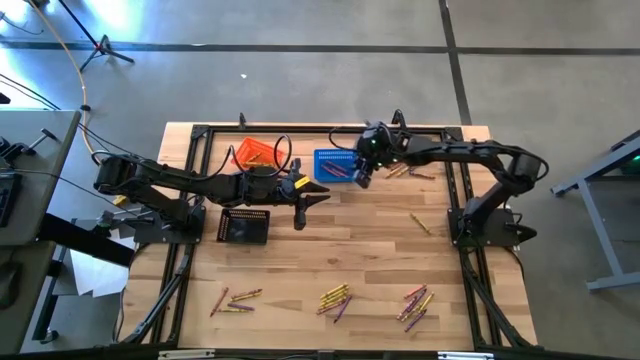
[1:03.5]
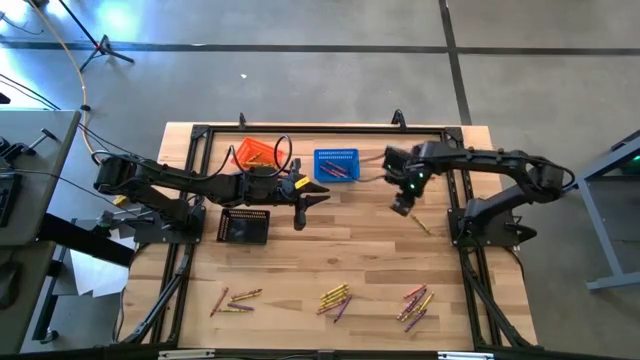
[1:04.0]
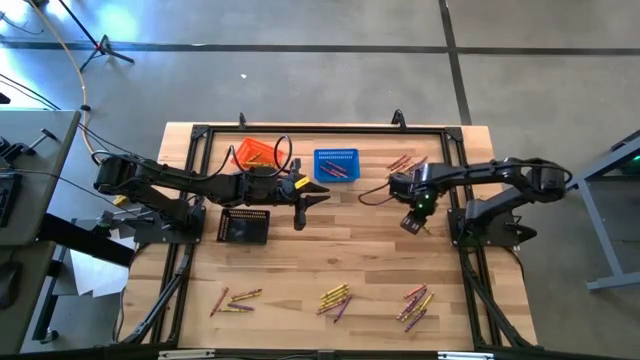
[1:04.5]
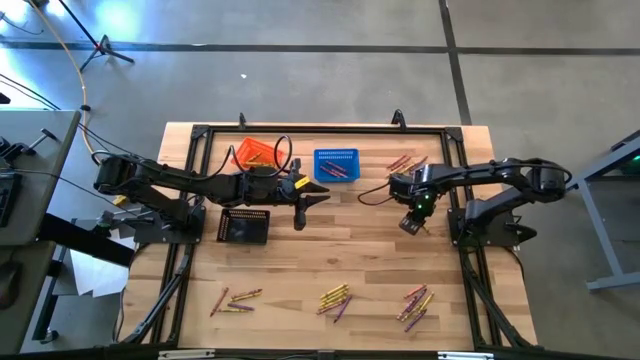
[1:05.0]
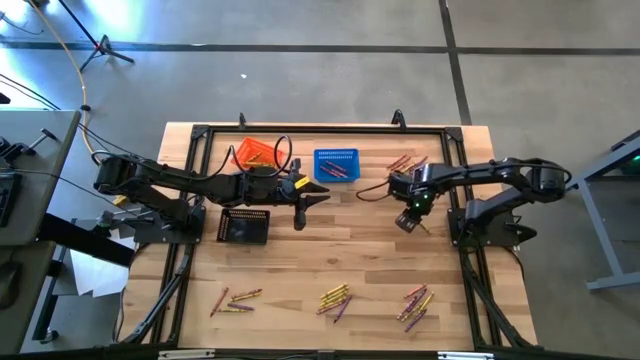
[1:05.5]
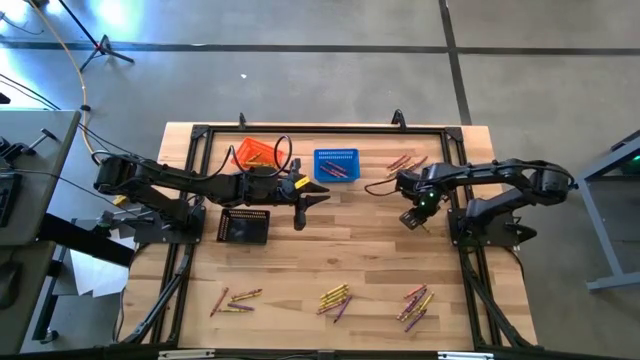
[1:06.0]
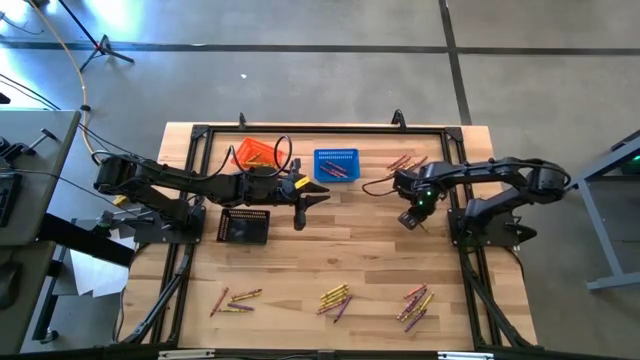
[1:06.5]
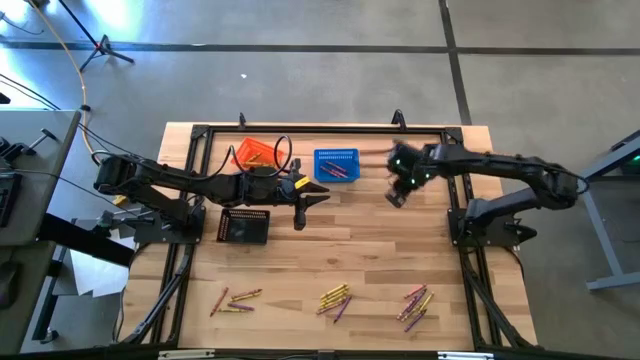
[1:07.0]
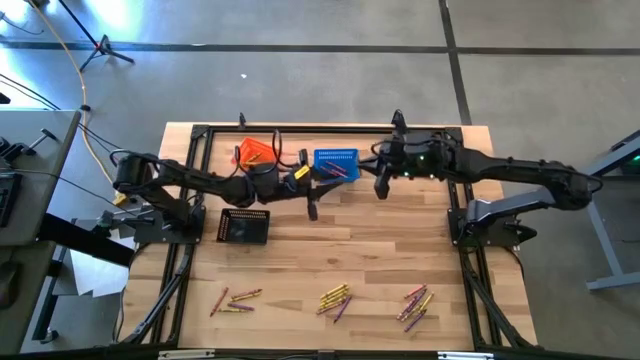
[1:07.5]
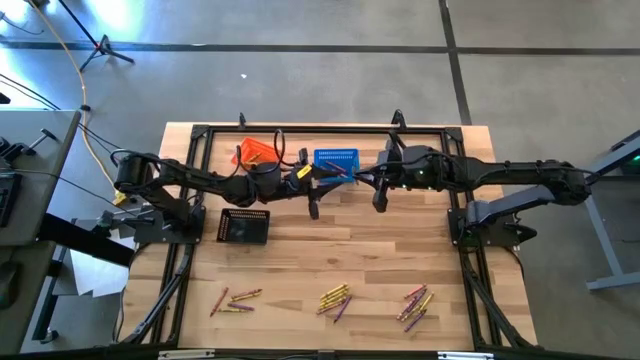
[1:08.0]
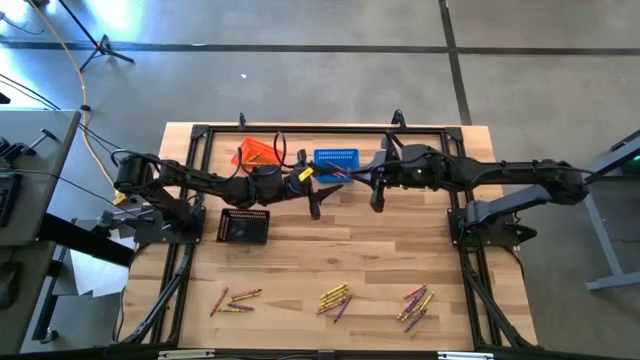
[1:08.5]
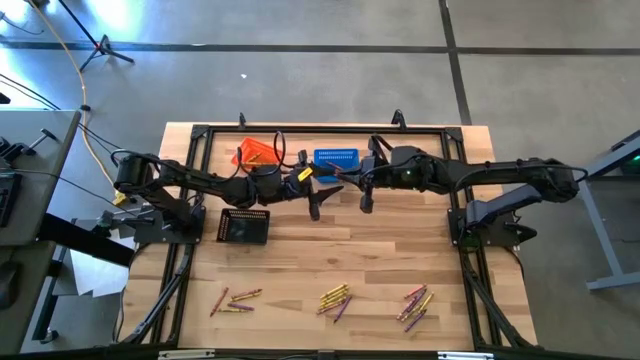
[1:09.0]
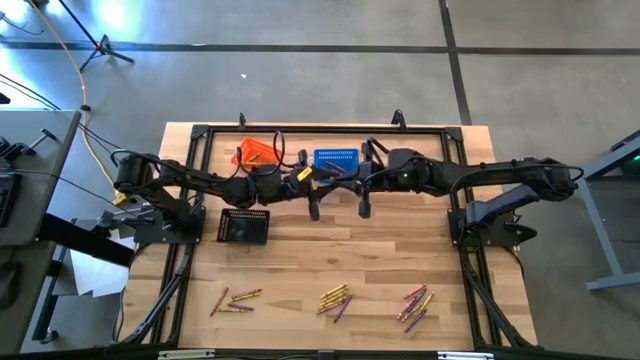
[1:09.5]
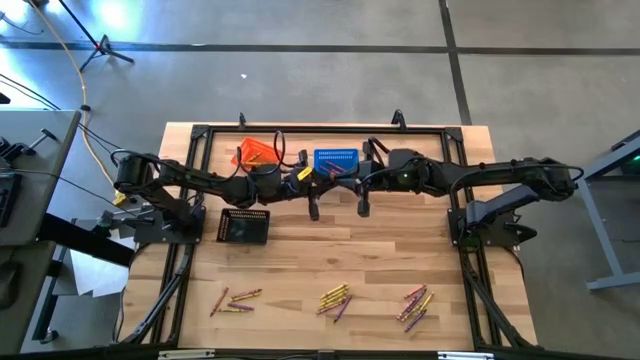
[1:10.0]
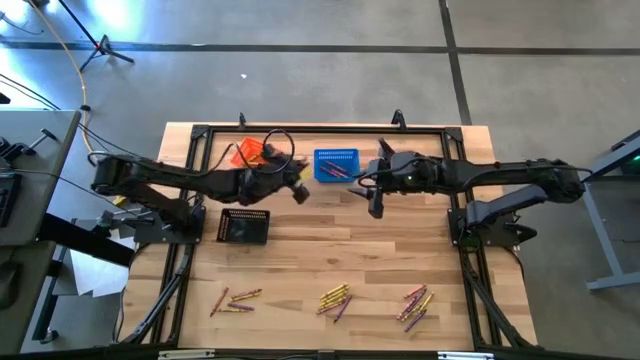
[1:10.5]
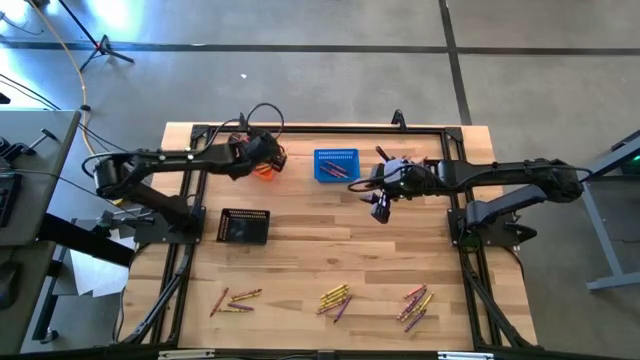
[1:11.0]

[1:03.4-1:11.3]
Task: Sort crayons
Put the yellow crayon into the orange bin

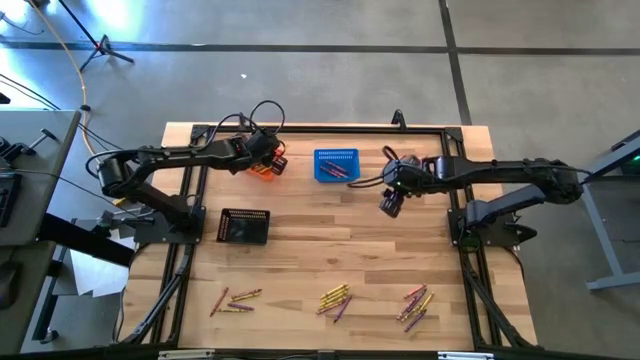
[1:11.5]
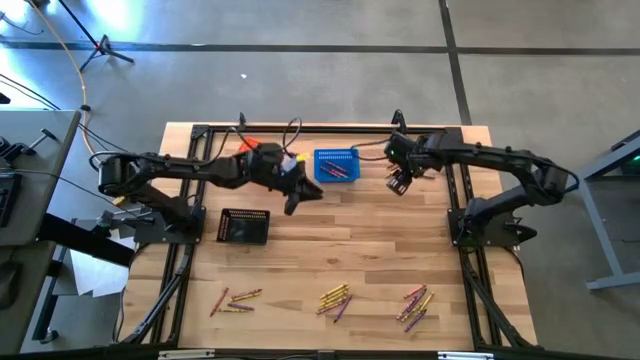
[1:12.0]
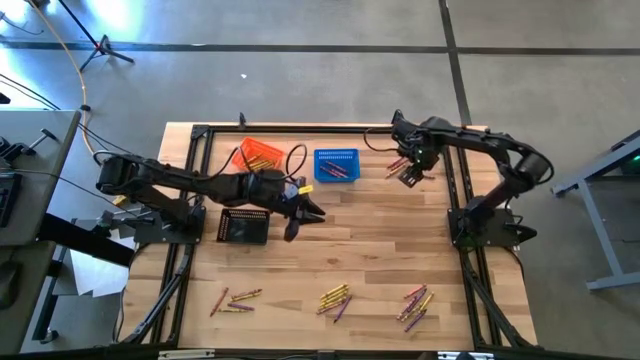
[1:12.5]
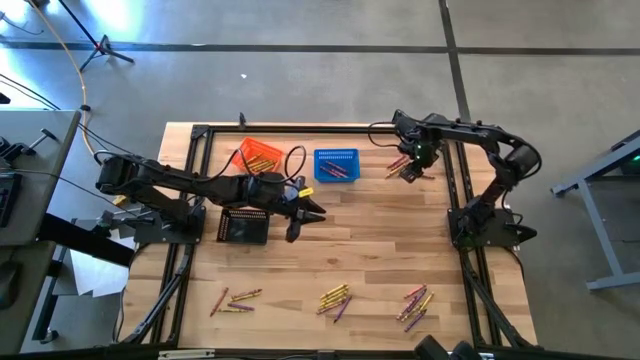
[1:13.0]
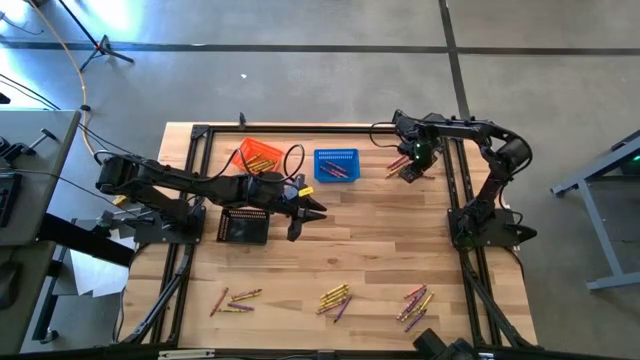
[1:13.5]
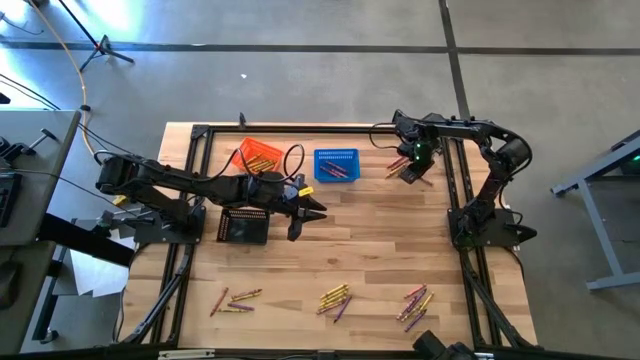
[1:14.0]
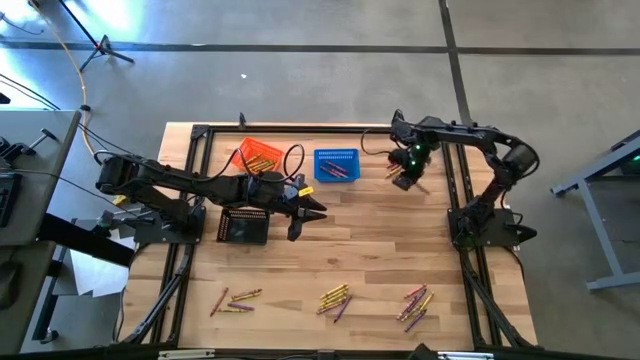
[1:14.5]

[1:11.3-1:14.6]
Put the red crayon into the blue bin

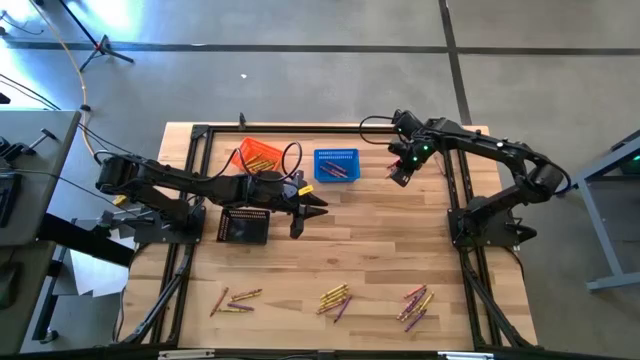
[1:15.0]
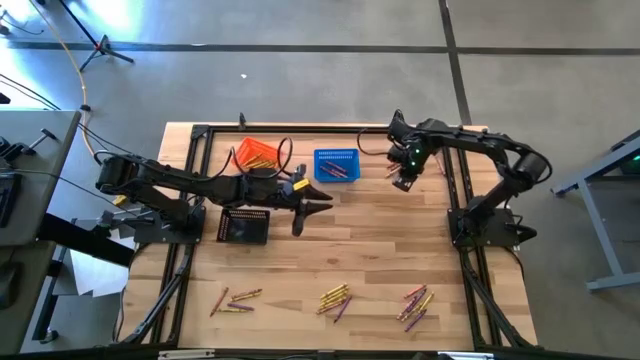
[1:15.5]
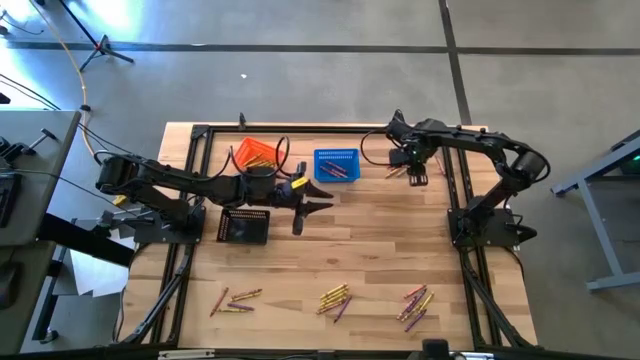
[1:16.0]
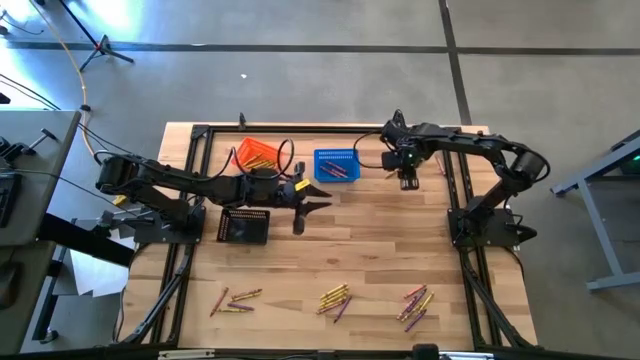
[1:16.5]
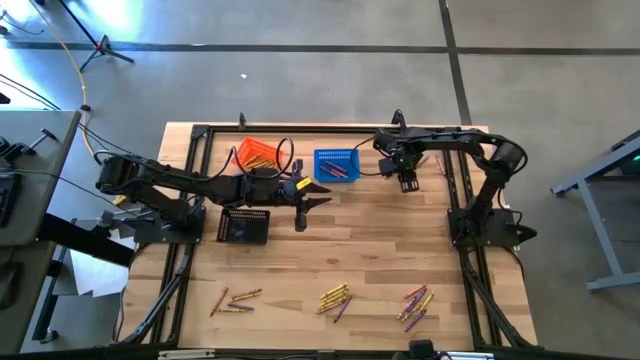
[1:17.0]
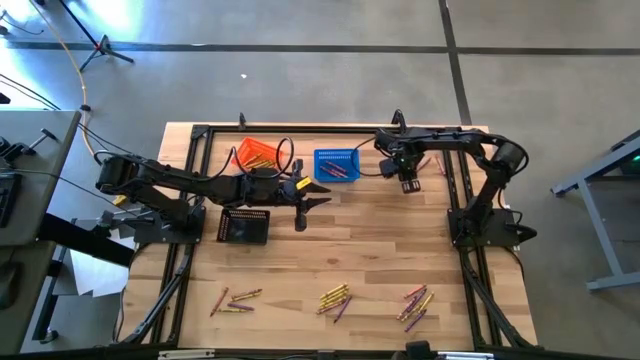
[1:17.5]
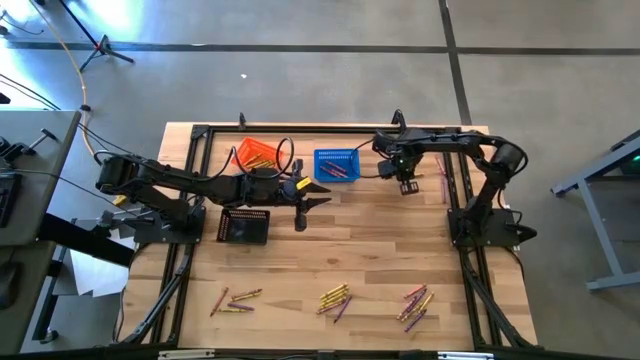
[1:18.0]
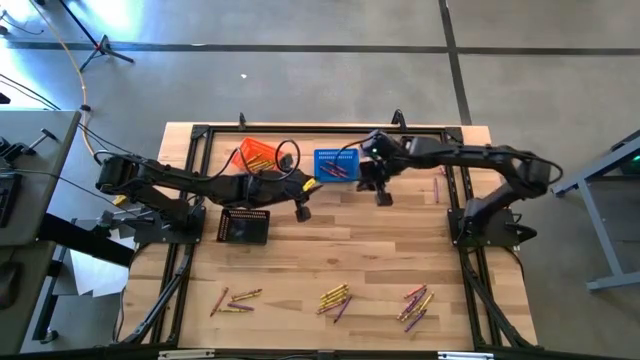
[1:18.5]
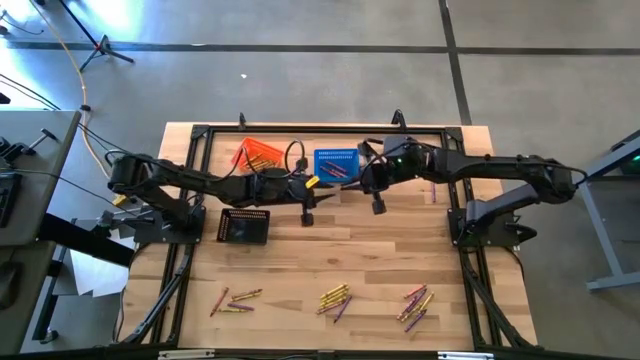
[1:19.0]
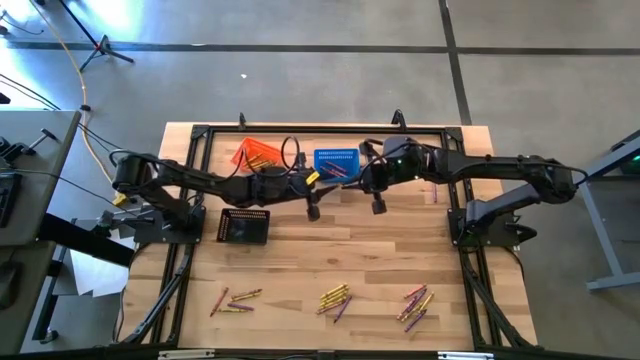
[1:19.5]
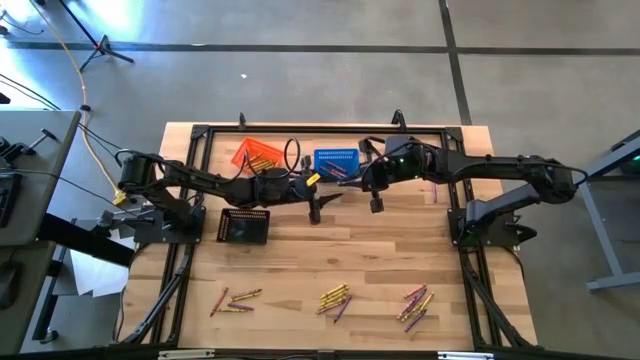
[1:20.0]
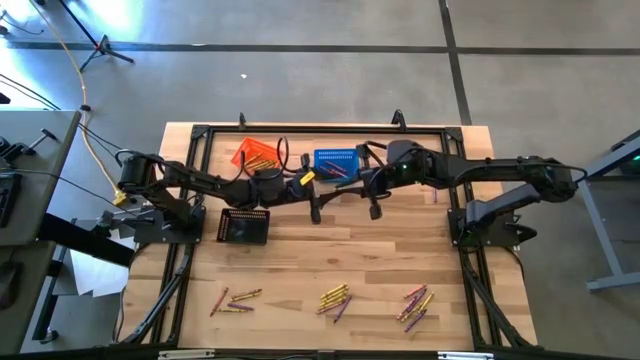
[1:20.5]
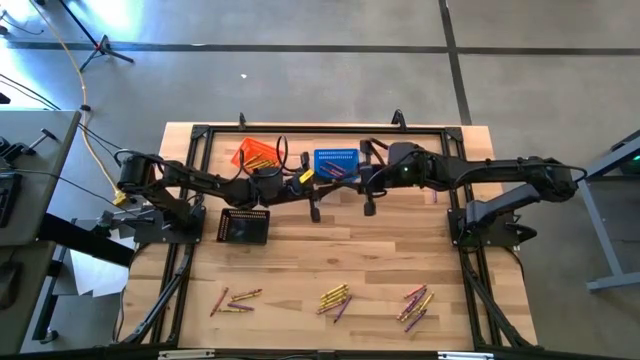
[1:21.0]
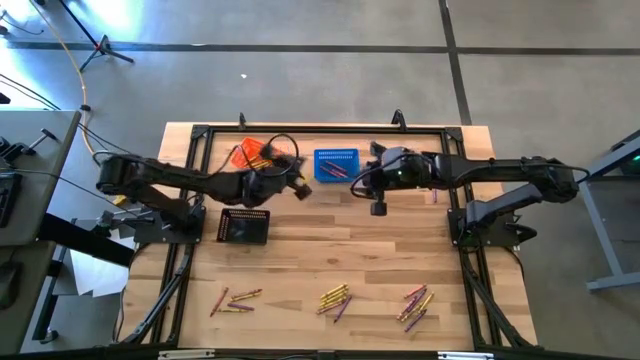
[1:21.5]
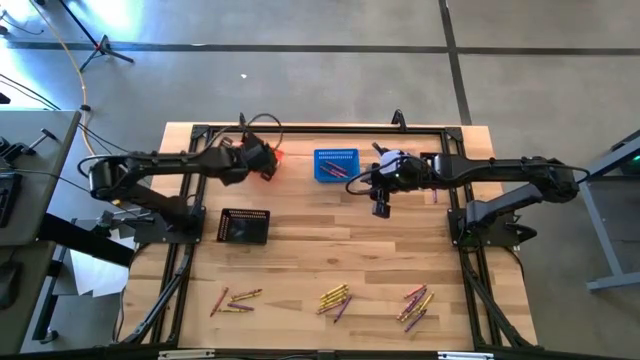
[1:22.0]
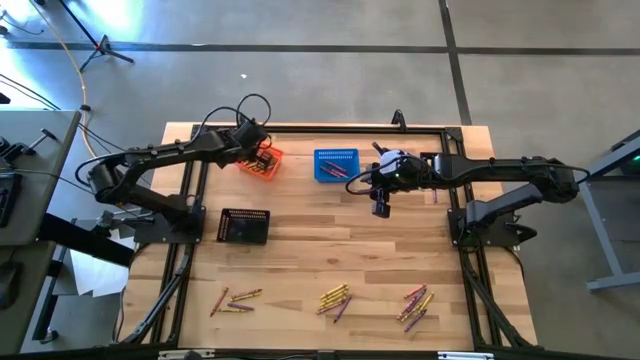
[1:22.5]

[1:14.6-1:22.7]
Put the yellow crayon into the orange bin

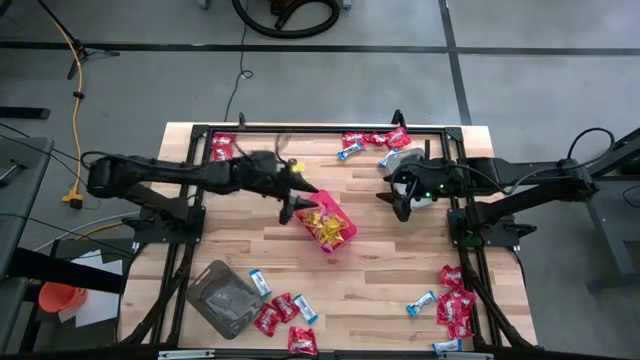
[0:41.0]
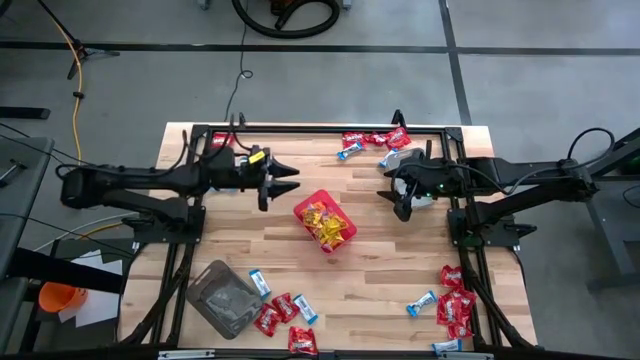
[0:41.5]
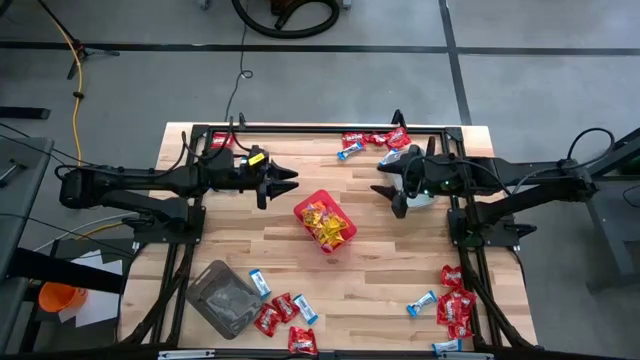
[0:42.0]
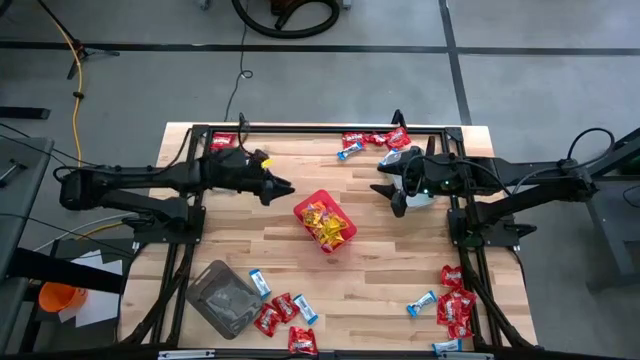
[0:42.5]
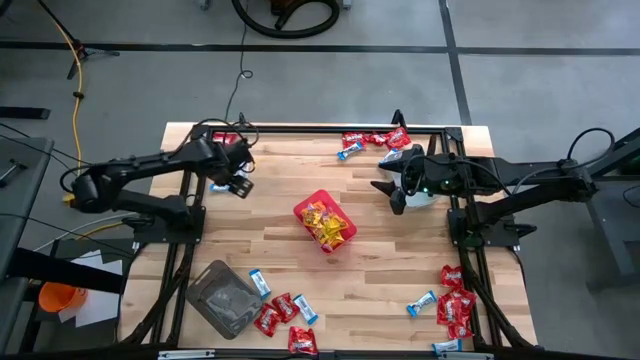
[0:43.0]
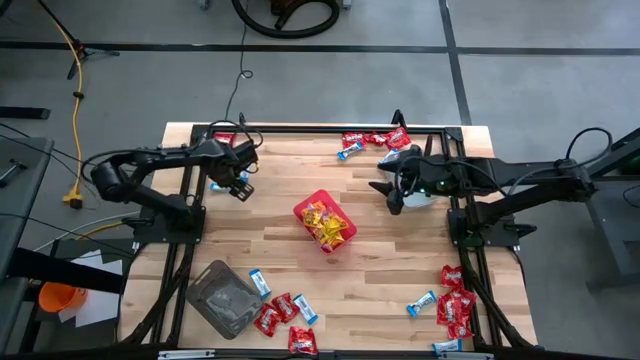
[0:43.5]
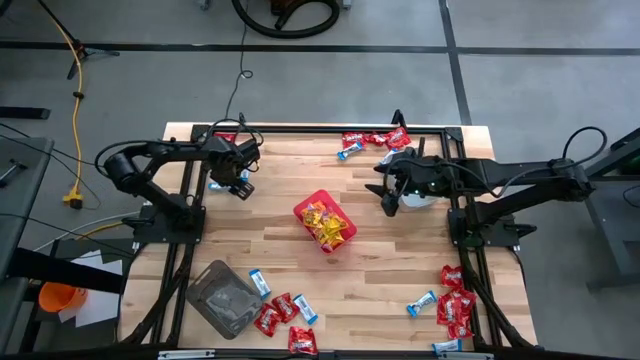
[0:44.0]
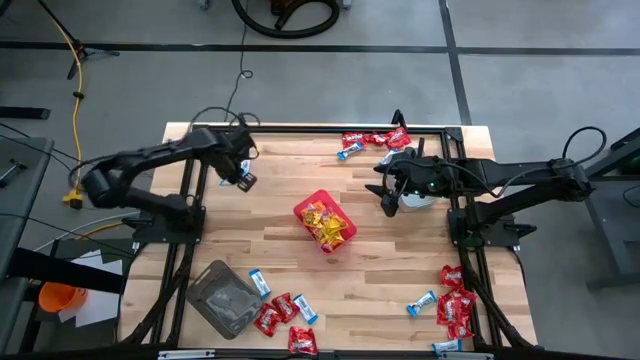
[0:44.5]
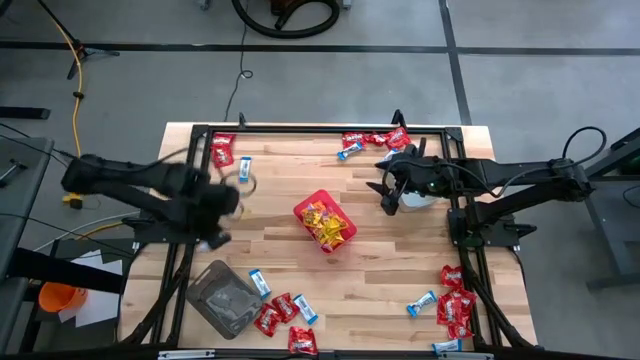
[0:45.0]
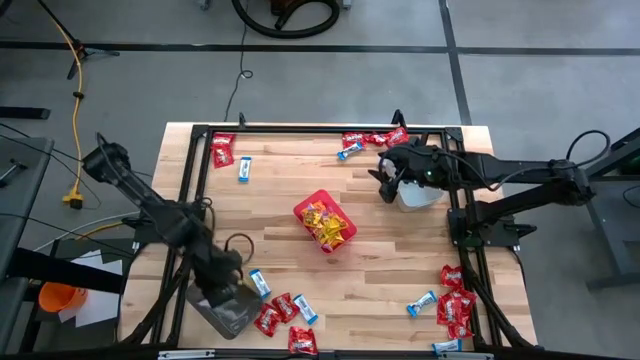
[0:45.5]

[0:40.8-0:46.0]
Task: Sort candy
Put the blue candy into the black bin
